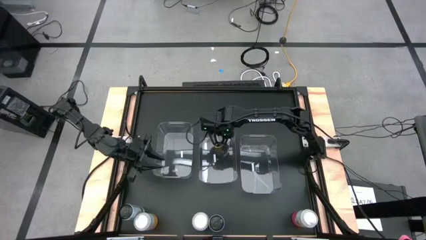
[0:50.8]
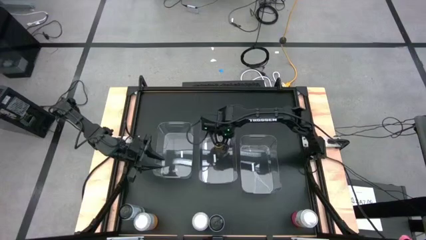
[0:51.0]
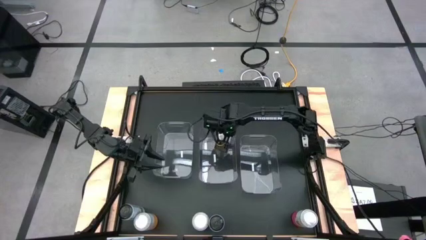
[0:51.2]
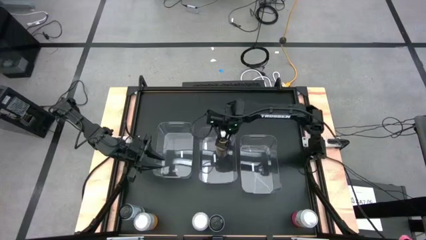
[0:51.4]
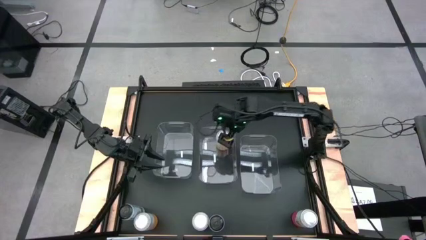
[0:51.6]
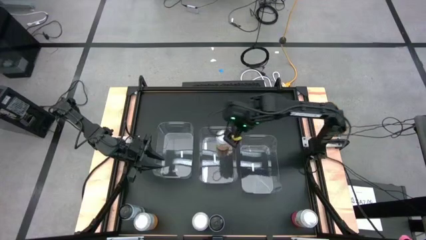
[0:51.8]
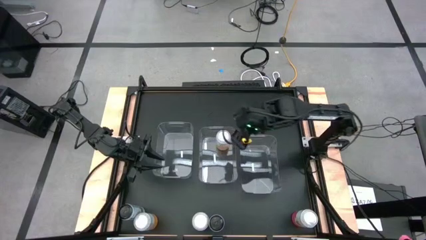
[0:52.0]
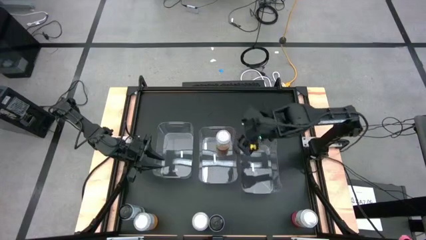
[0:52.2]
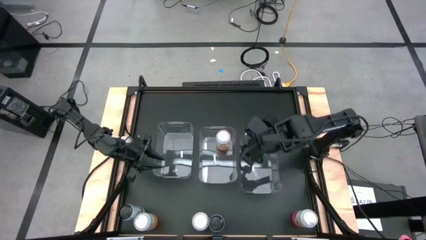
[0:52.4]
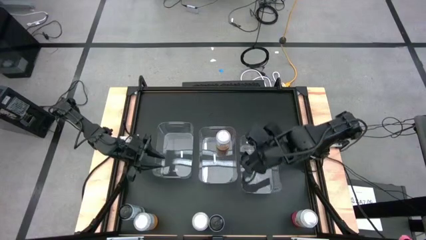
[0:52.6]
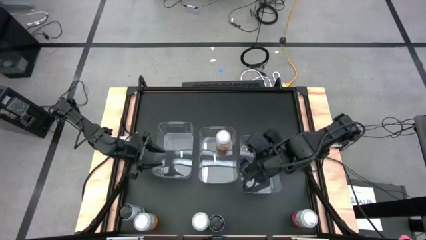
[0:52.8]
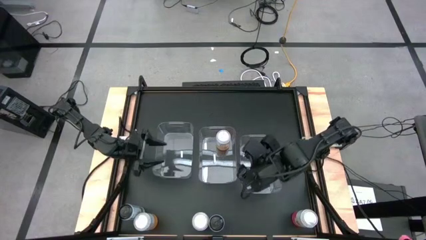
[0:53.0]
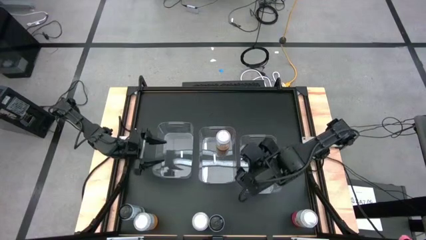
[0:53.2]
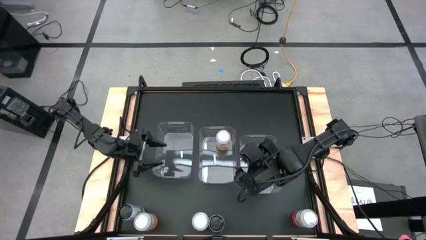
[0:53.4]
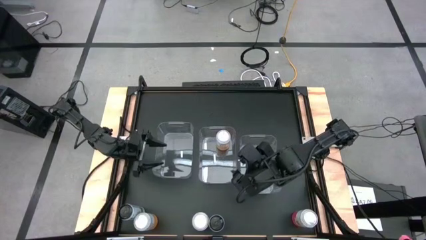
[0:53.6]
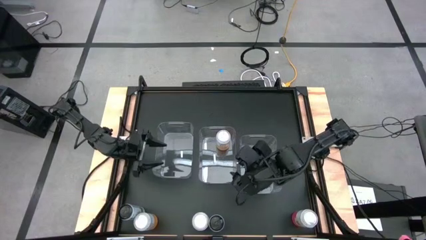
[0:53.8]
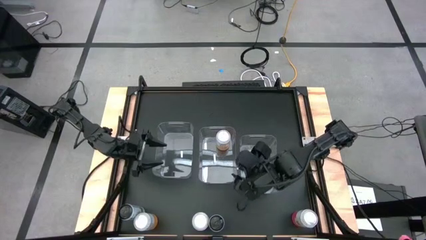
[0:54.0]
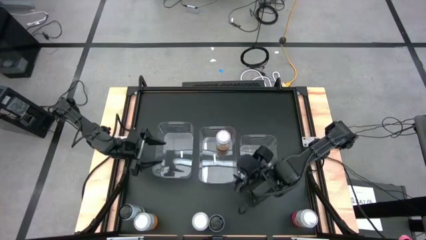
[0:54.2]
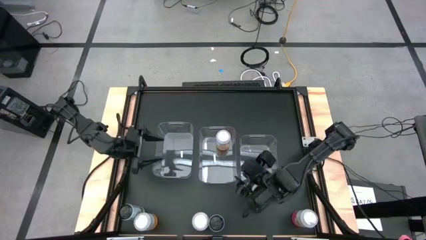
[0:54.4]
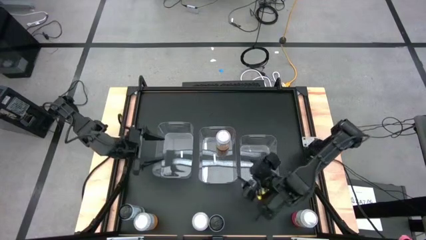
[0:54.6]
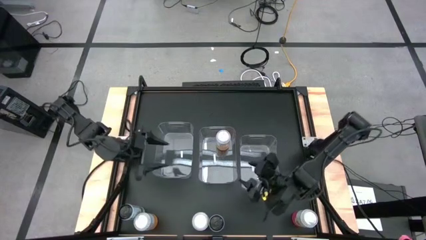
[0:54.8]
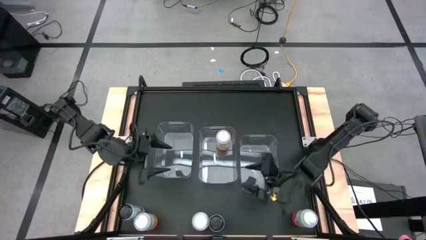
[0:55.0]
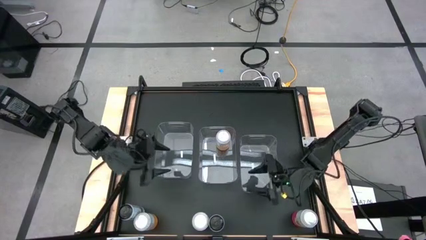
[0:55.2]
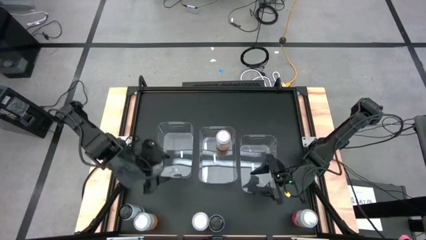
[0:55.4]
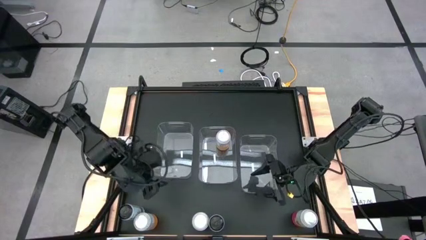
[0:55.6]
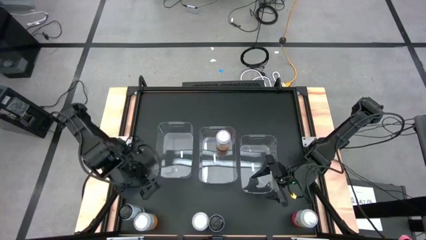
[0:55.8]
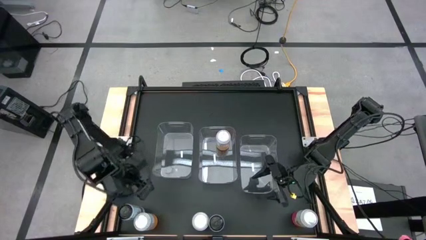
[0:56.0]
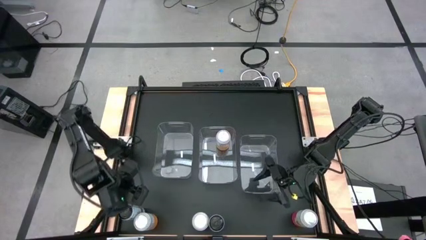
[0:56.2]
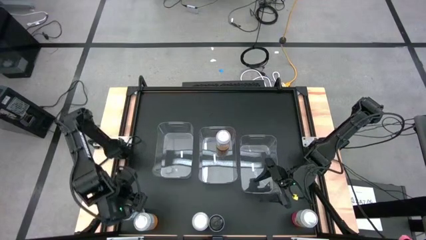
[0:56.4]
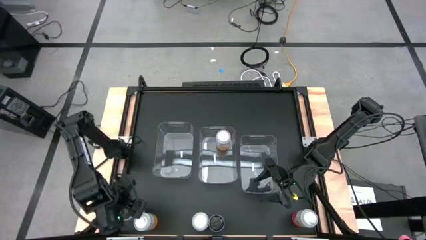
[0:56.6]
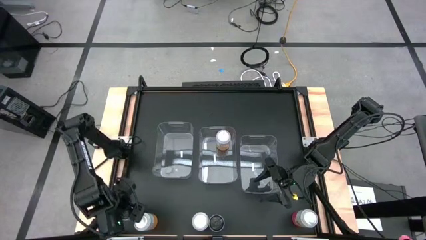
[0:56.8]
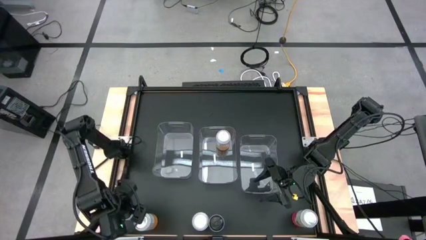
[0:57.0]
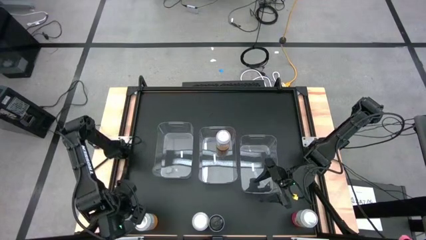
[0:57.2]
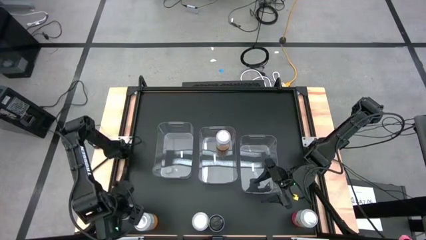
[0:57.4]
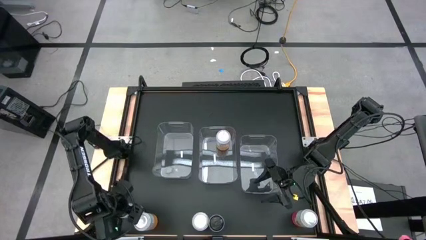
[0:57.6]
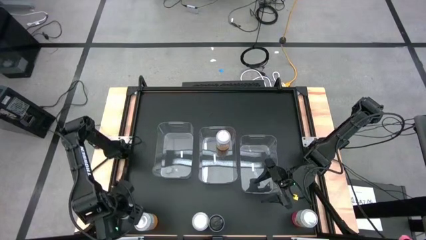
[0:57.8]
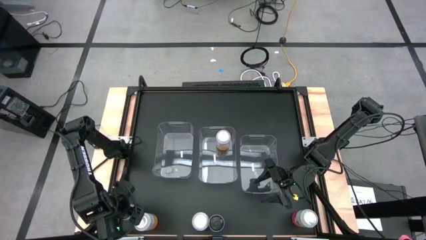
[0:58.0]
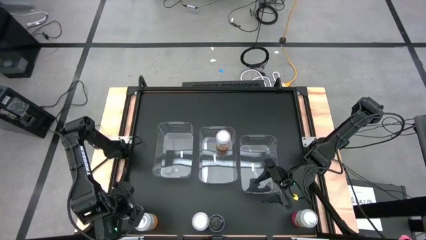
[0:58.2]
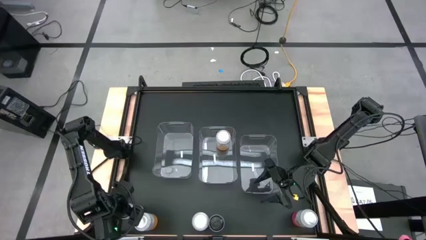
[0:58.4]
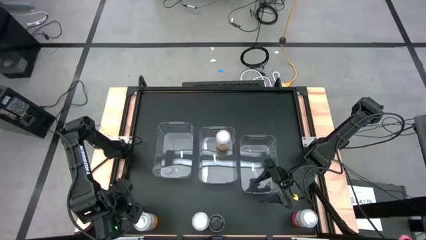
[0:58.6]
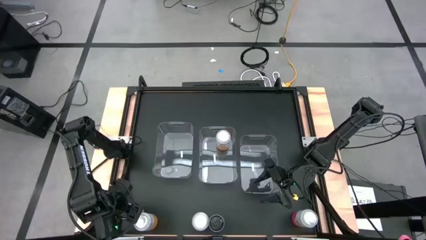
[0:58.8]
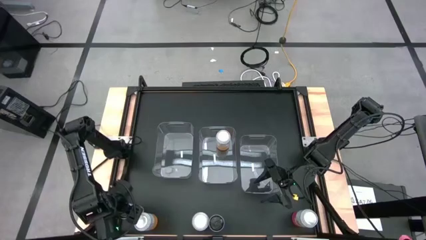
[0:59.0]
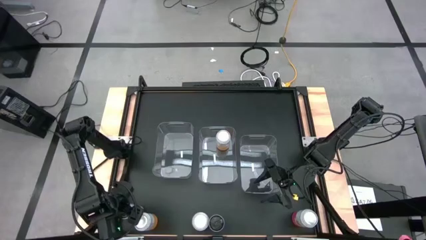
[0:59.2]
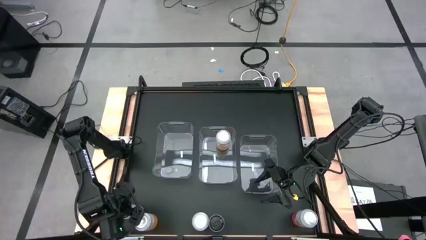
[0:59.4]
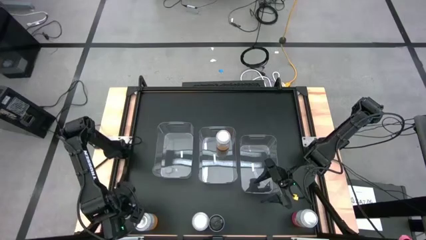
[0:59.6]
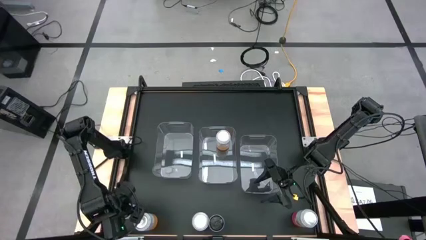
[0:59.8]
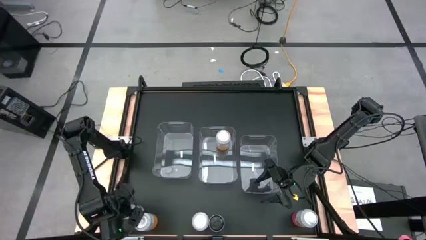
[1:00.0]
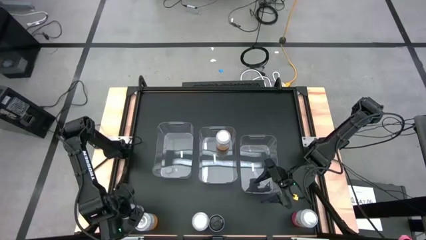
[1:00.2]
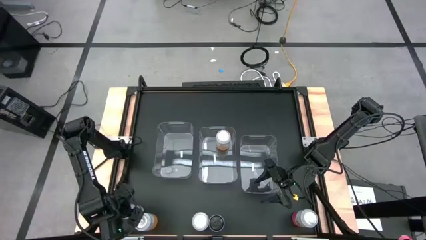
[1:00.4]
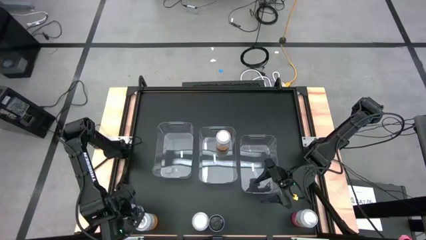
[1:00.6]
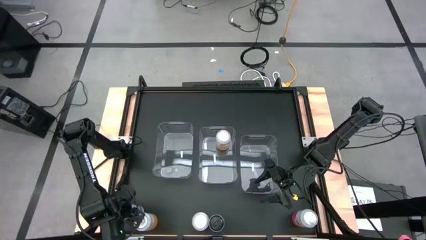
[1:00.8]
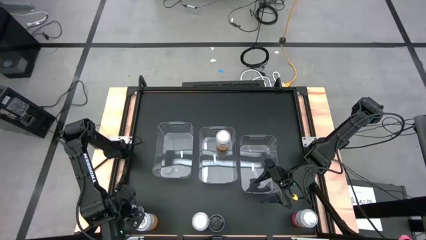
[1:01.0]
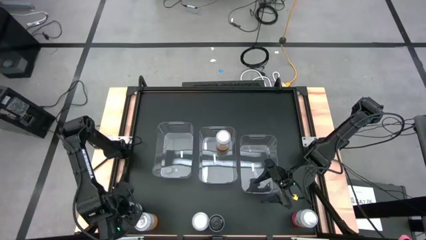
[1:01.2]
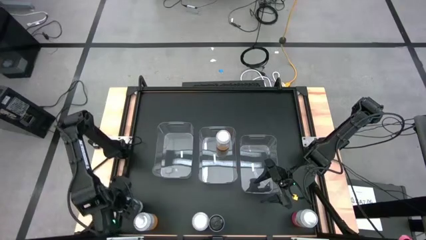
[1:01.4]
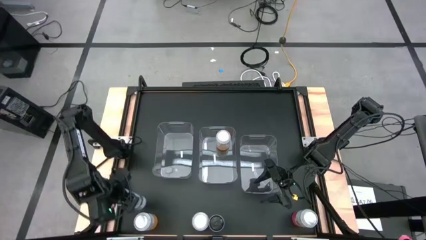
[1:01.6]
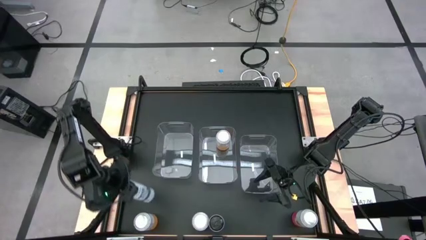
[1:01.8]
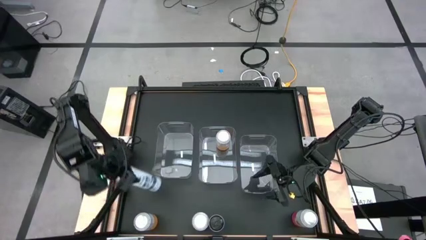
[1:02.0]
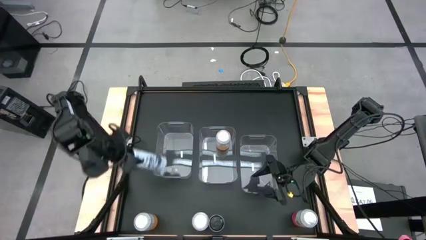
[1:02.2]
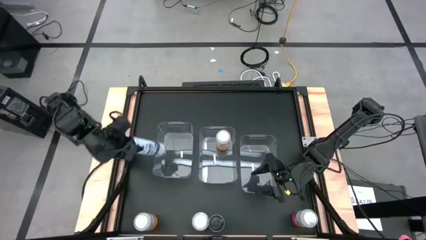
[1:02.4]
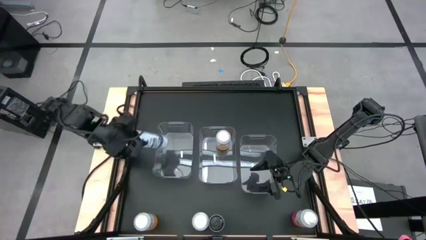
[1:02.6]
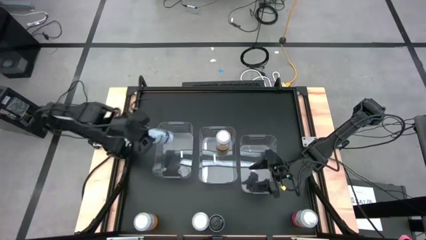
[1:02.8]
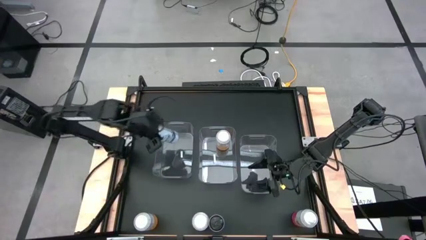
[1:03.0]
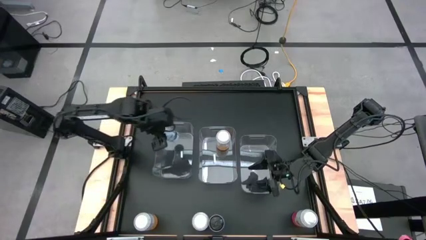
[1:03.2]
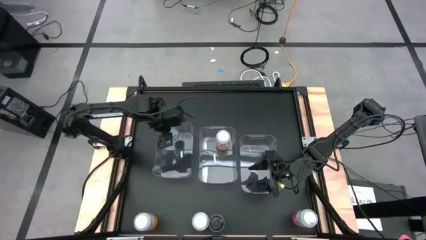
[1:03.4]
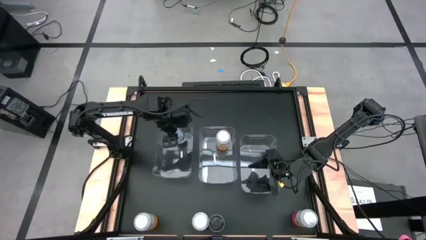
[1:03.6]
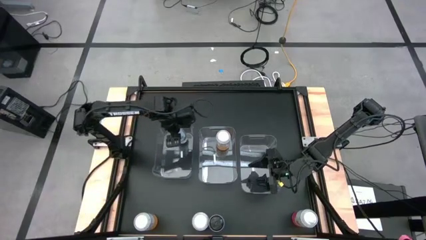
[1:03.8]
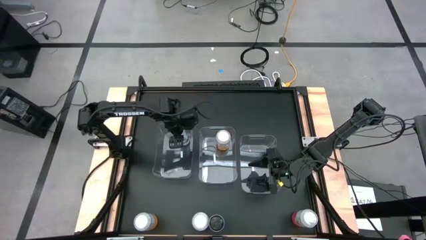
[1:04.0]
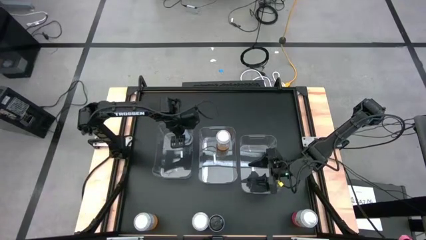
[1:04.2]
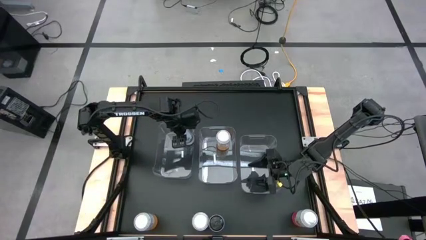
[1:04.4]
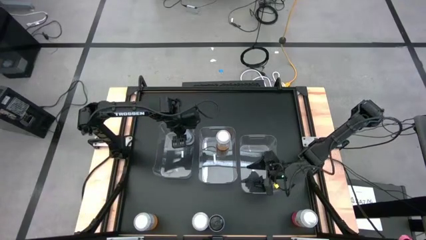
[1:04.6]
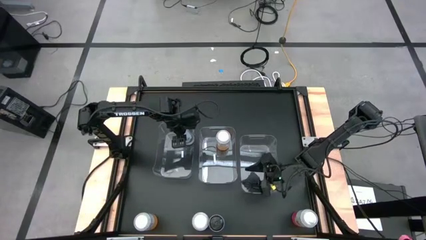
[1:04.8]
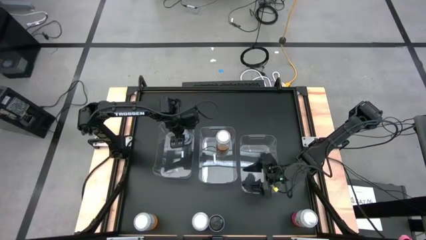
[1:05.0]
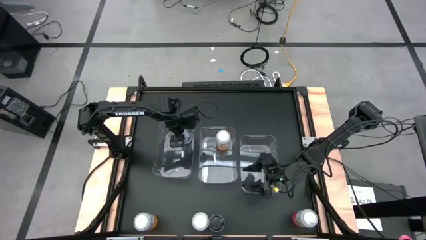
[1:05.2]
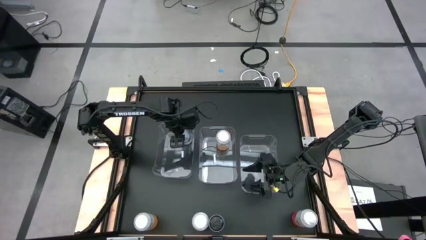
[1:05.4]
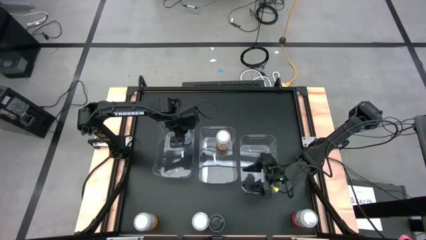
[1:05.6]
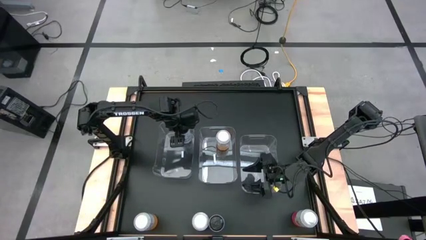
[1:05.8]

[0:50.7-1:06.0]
Task: Sort soda cans
Put the left white-blue soda can into the left transparent bin
